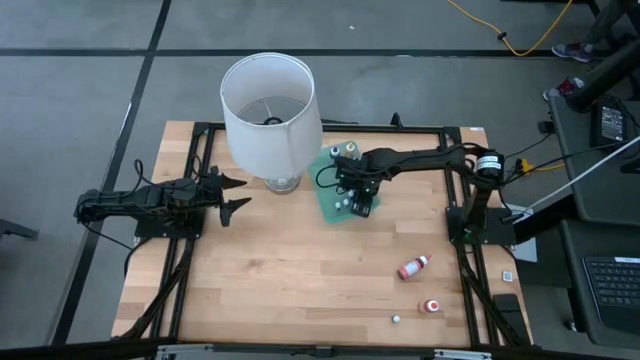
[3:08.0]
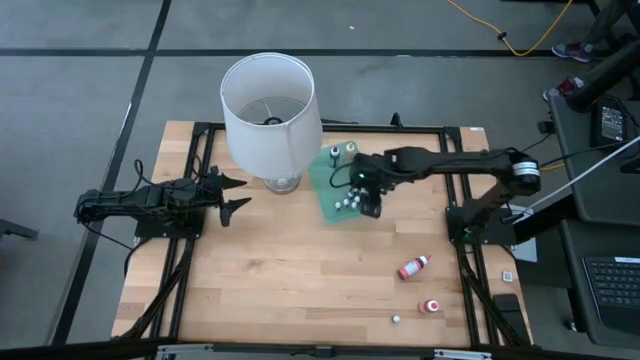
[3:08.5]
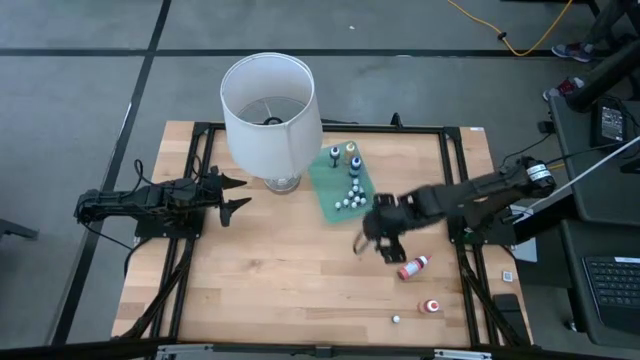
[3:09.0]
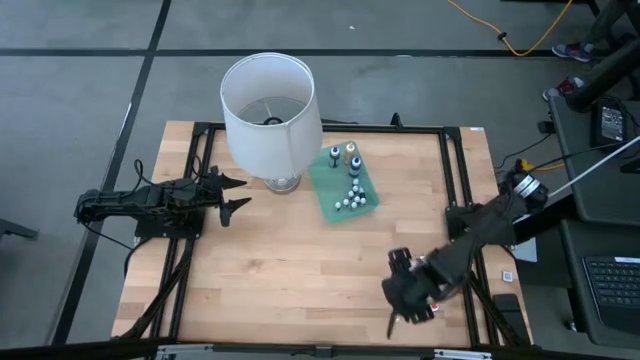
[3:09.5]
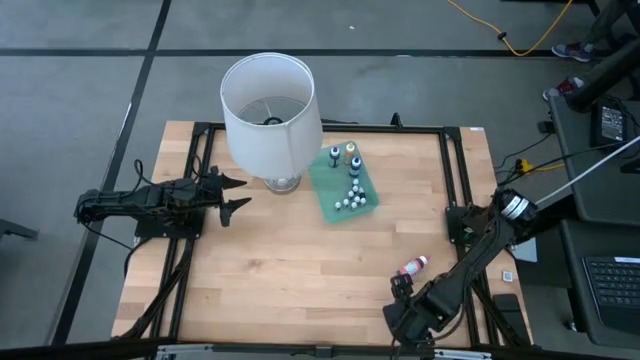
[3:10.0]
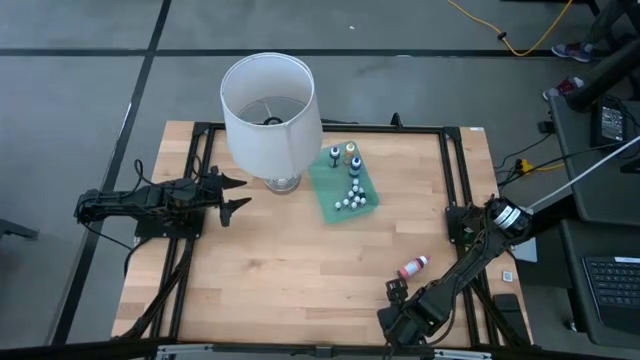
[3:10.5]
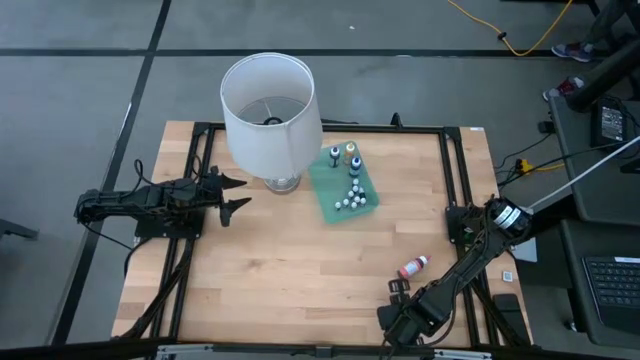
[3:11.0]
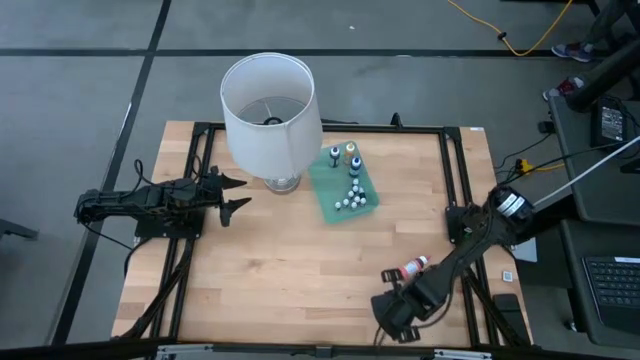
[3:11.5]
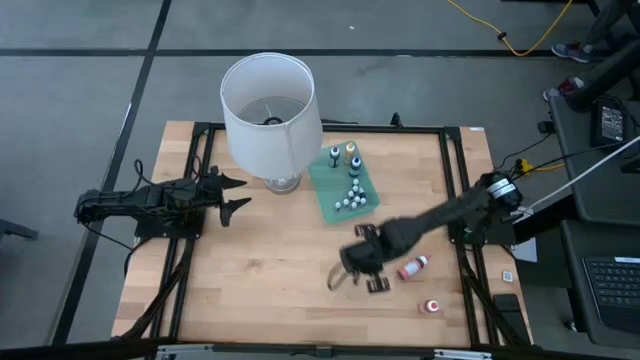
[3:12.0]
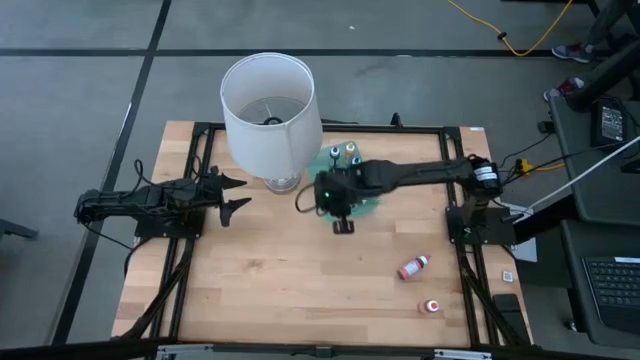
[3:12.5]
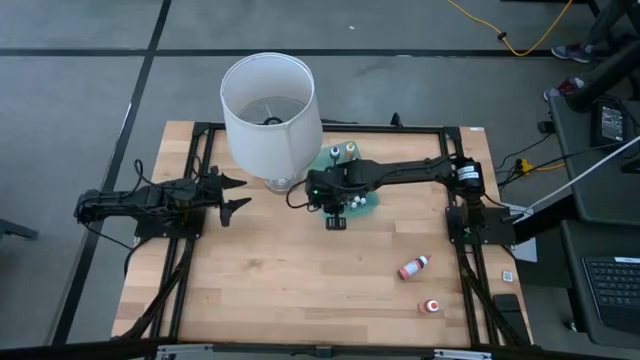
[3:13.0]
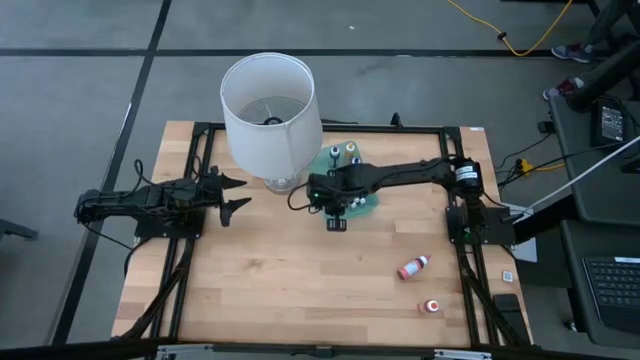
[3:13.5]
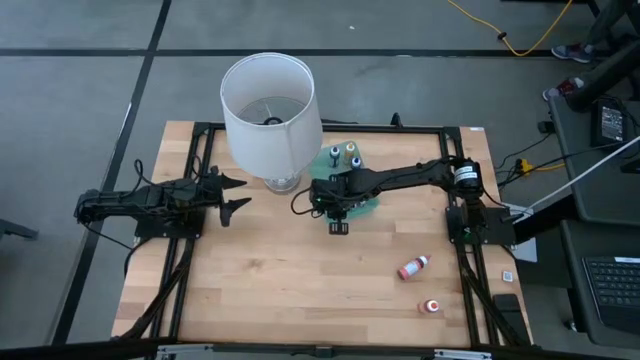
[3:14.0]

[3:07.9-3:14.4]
Task: Pick & Place food coloring
Put the small green food coloring bottle into the green bin

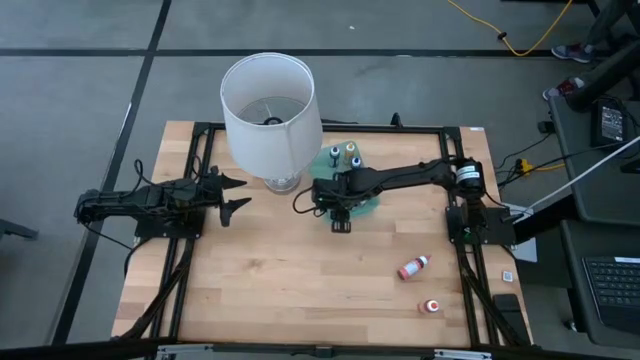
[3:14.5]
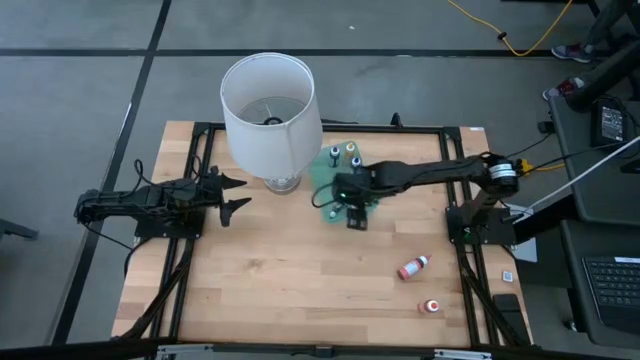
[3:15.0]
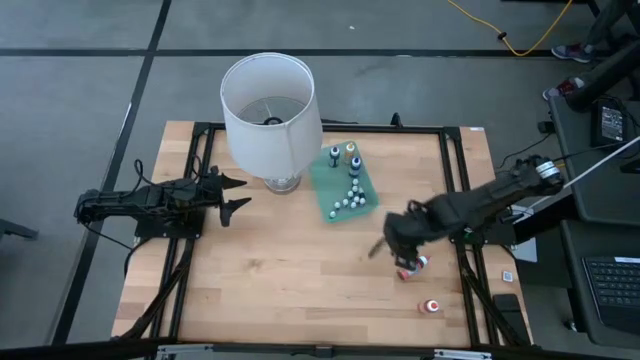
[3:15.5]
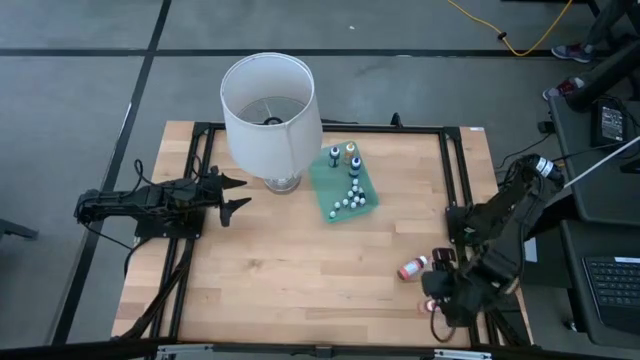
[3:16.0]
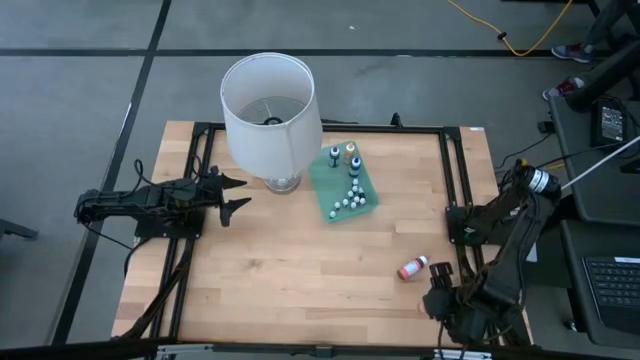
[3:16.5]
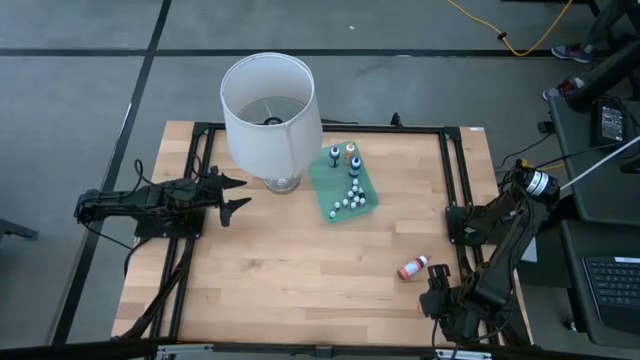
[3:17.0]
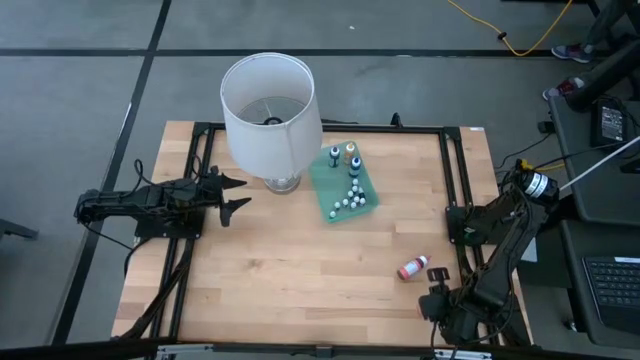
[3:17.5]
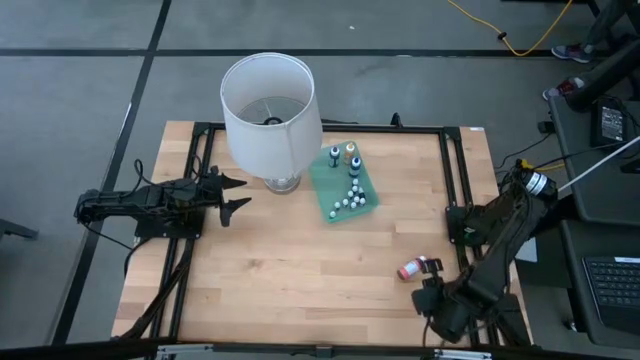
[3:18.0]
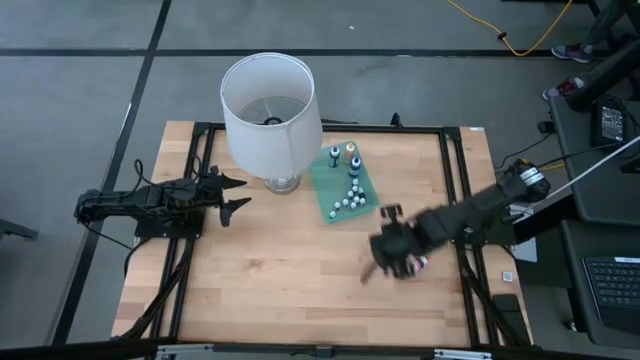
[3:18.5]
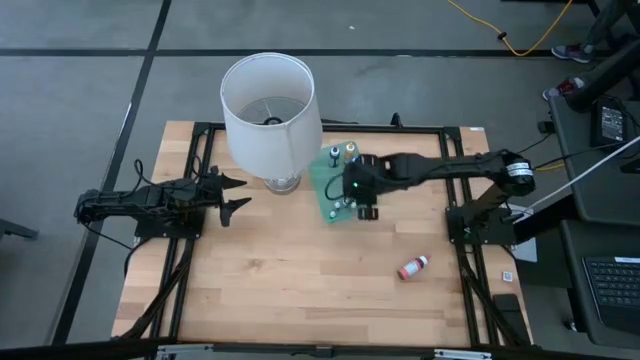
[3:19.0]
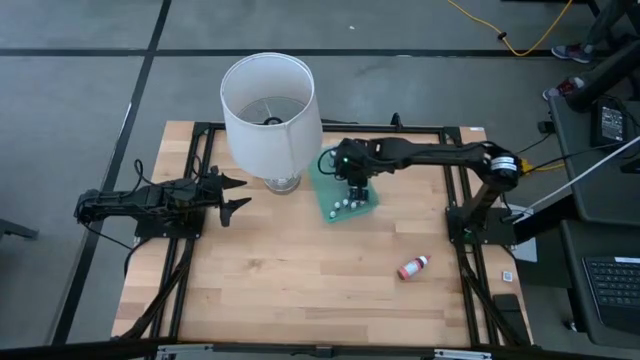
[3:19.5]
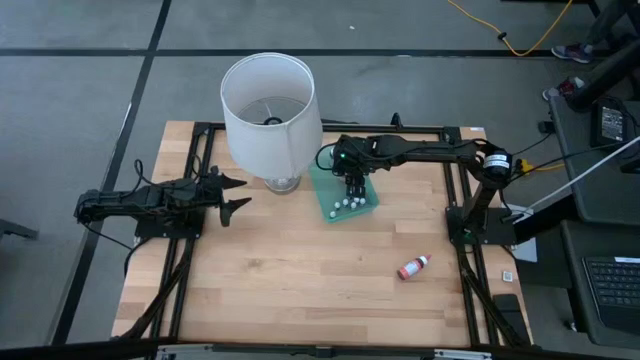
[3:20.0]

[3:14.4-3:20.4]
Put the large orange food coloring bottle into the green bin

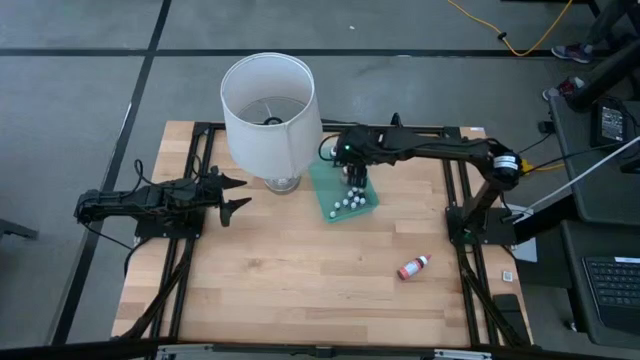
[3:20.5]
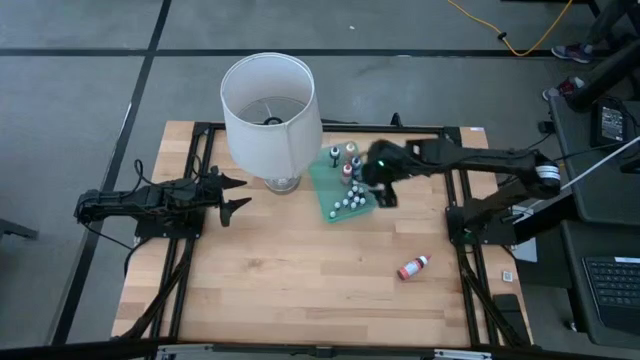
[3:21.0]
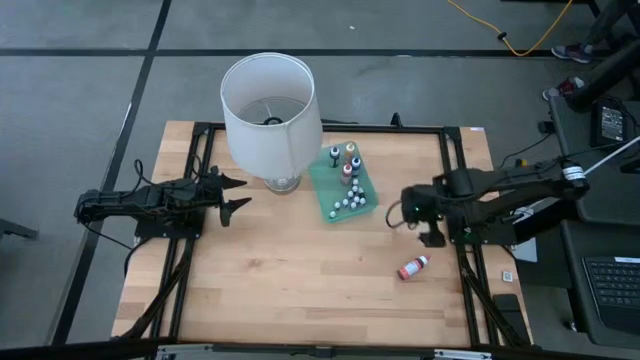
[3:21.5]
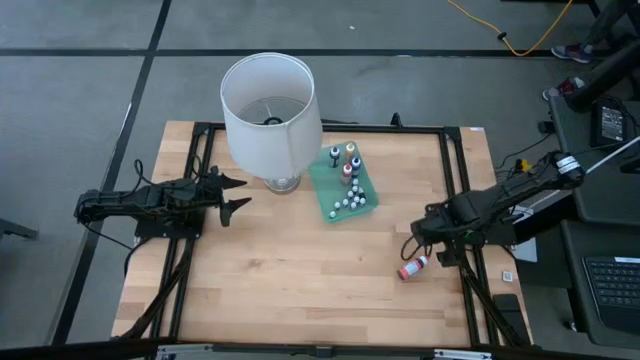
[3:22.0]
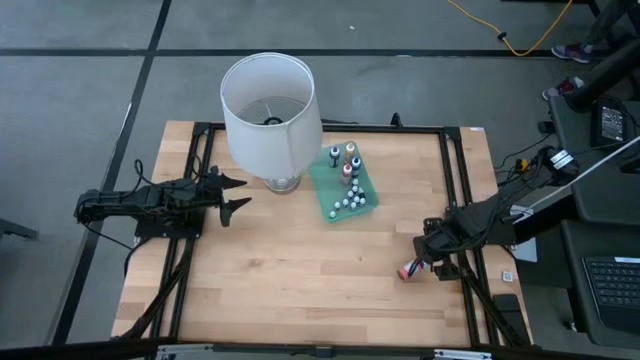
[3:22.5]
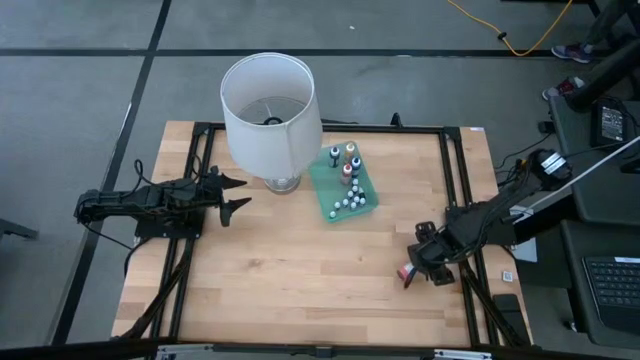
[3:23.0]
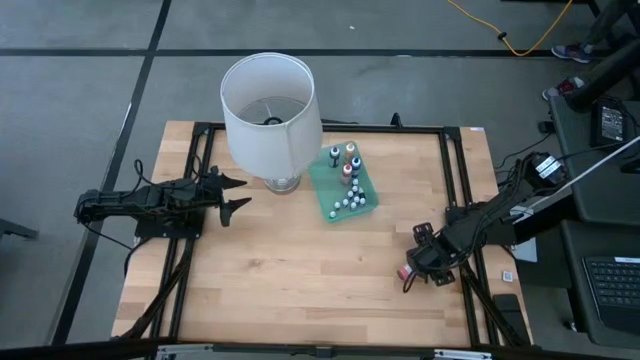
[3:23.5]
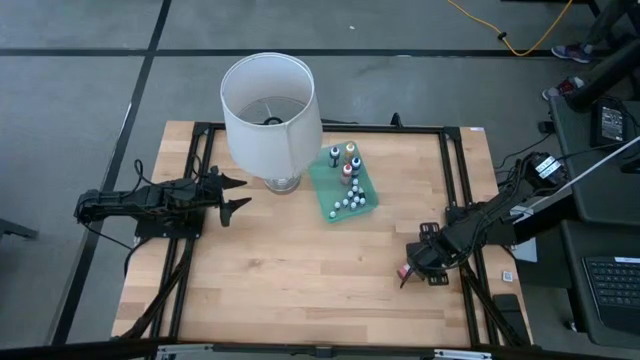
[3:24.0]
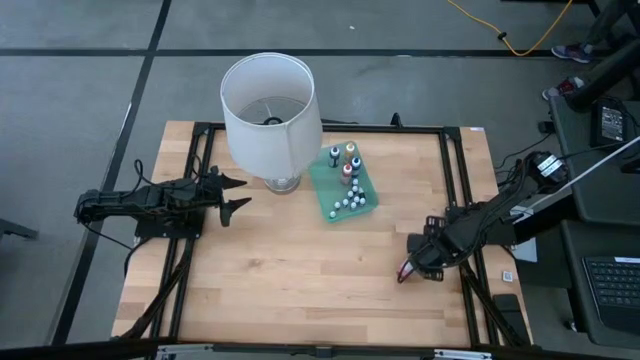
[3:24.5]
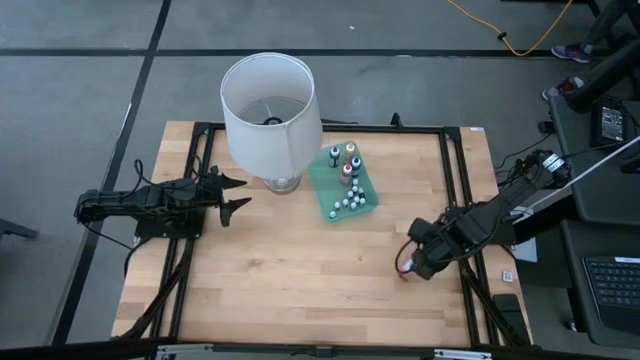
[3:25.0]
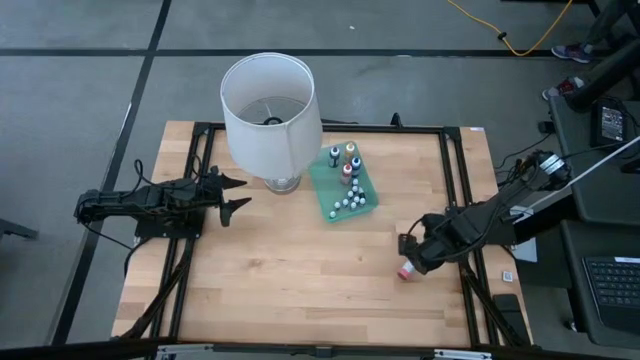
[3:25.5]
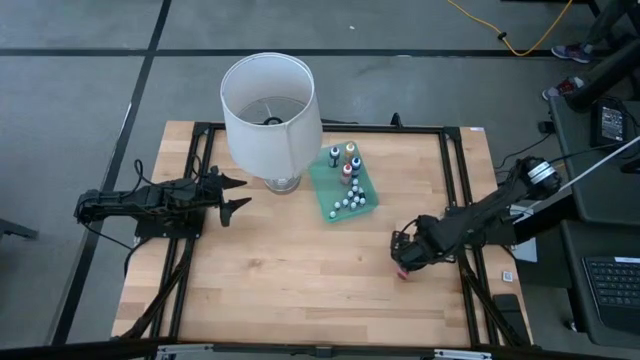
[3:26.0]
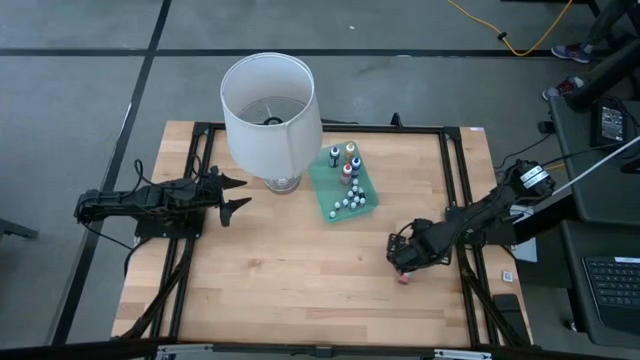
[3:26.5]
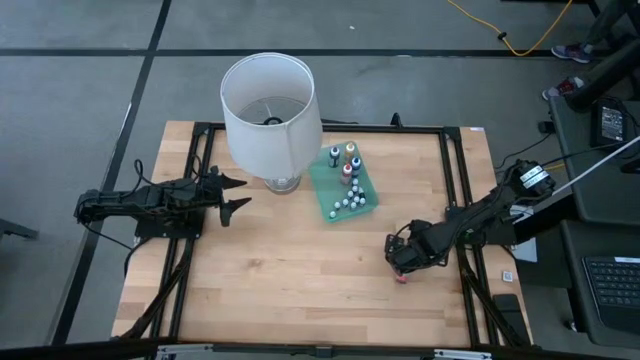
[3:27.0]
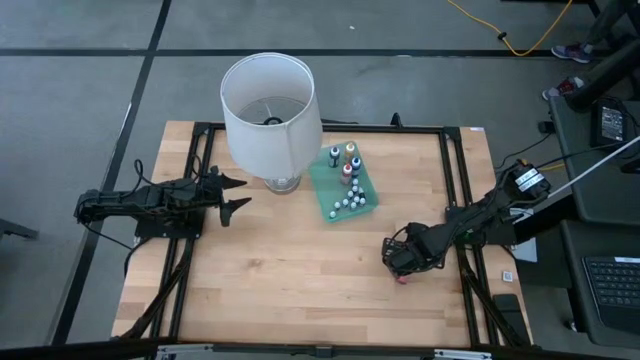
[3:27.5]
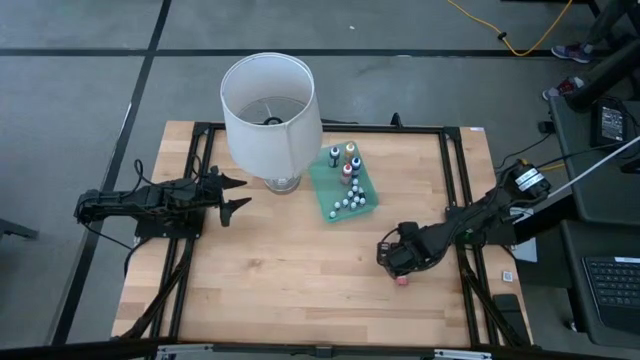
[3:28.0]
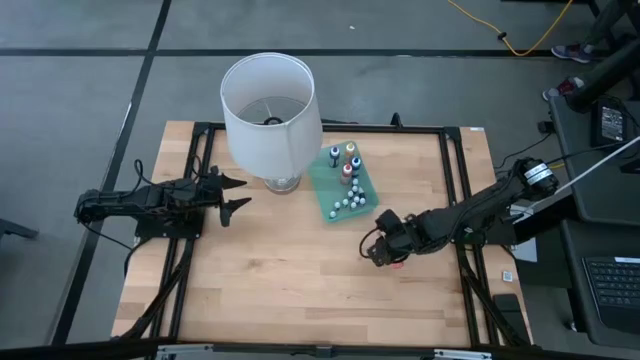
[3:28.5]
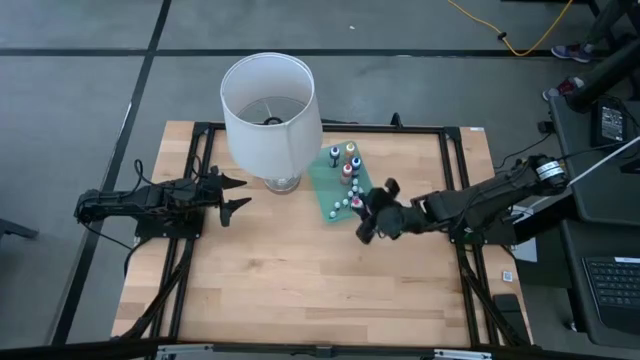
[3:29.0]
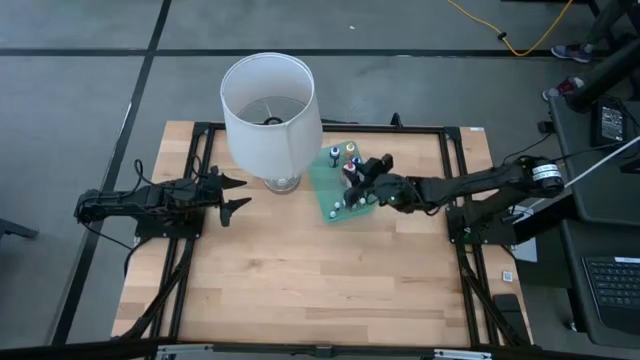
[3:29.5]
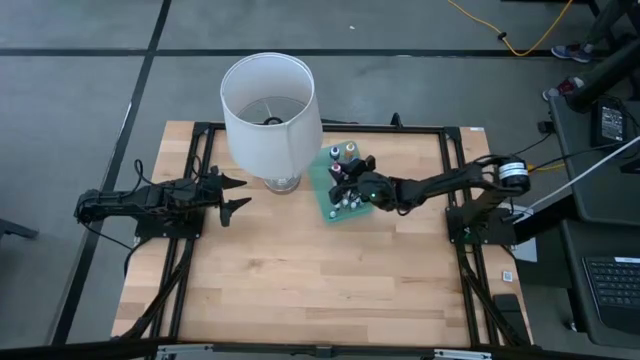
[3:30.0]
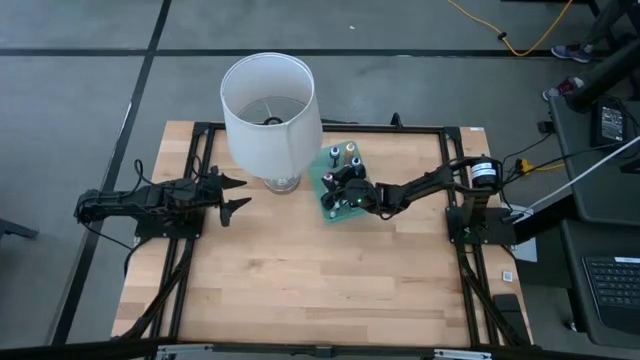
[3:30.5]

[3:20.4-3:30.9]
Put the large pink food coloring bottle into the green bin
